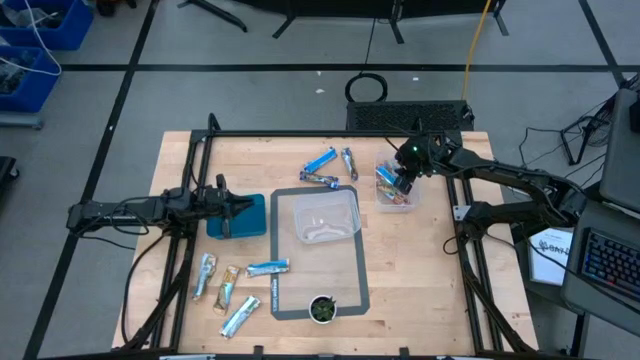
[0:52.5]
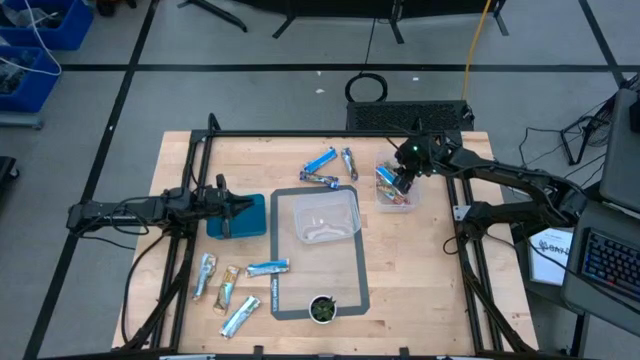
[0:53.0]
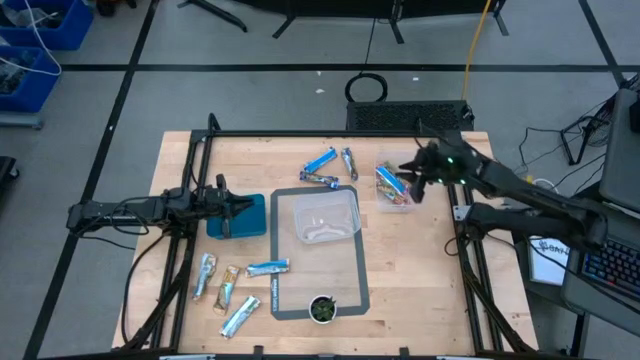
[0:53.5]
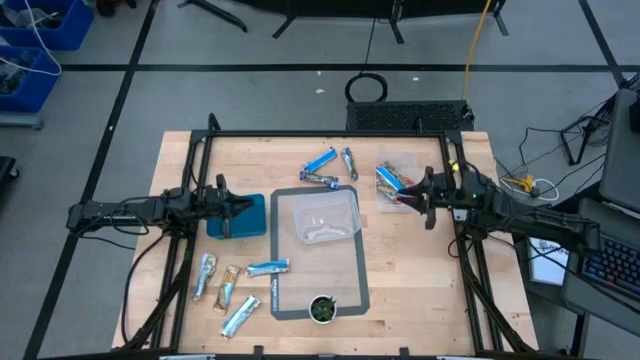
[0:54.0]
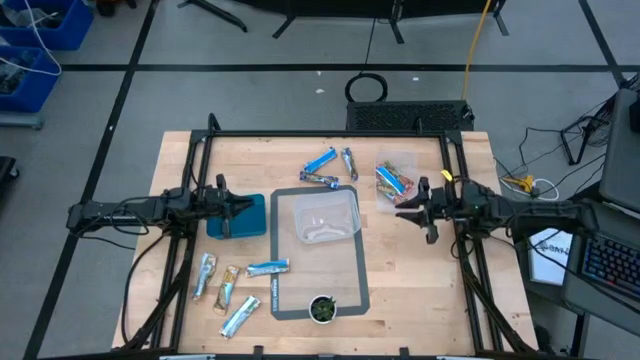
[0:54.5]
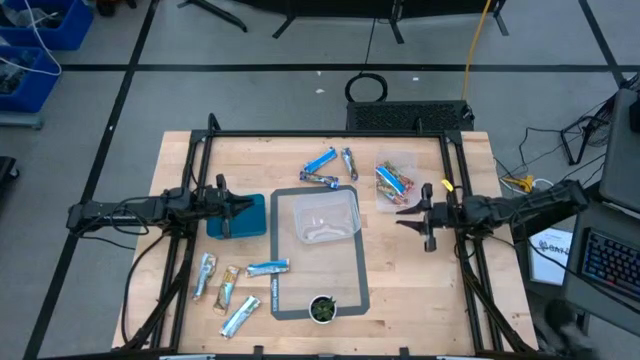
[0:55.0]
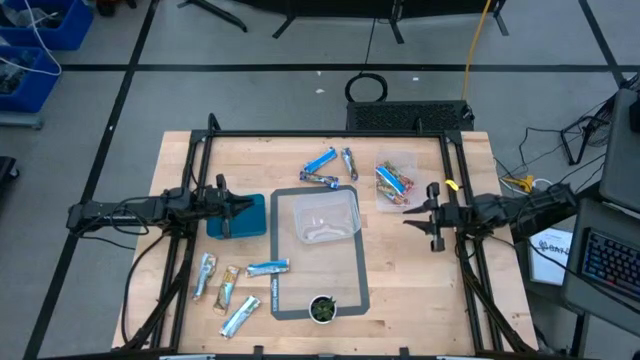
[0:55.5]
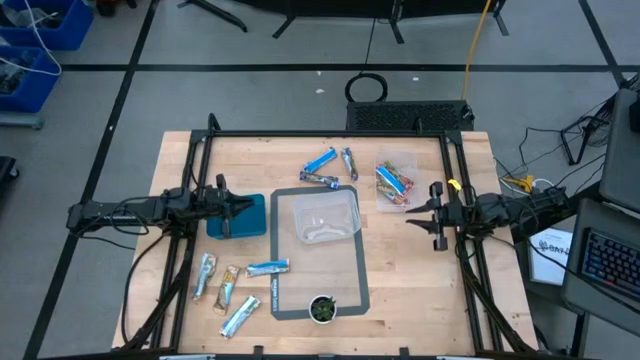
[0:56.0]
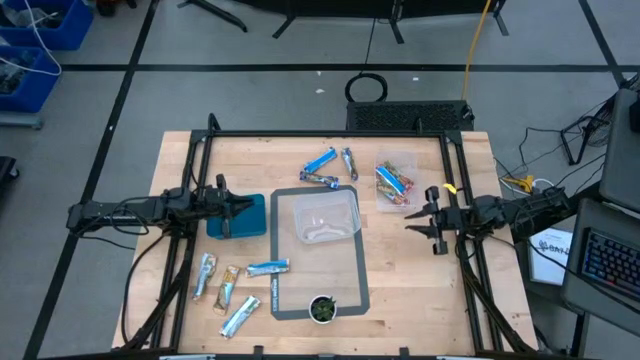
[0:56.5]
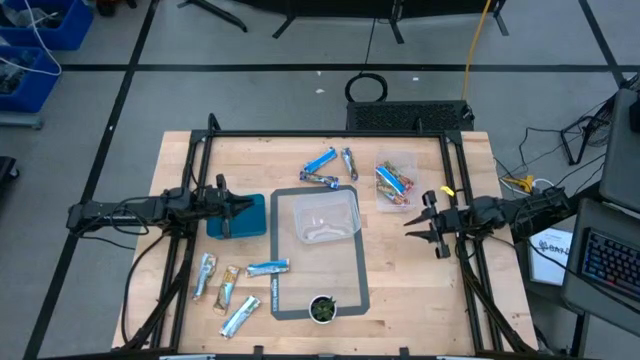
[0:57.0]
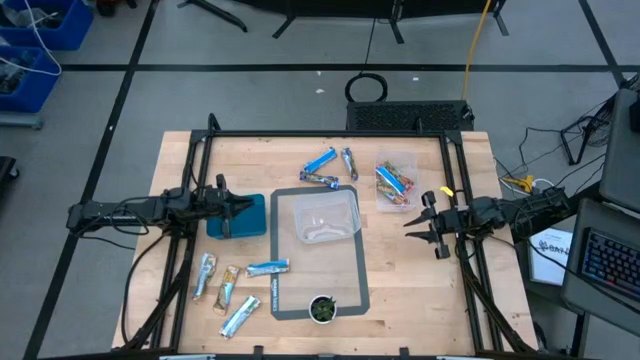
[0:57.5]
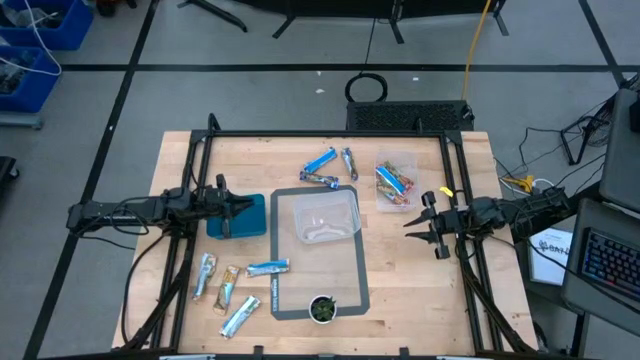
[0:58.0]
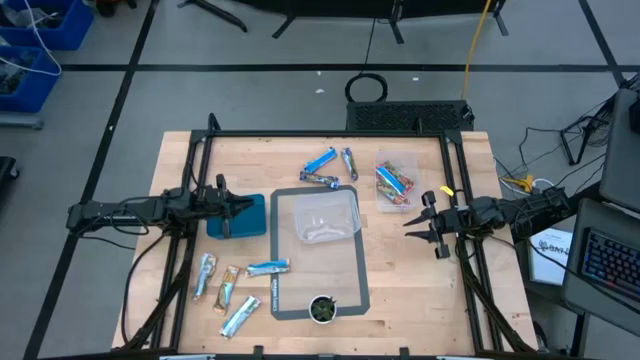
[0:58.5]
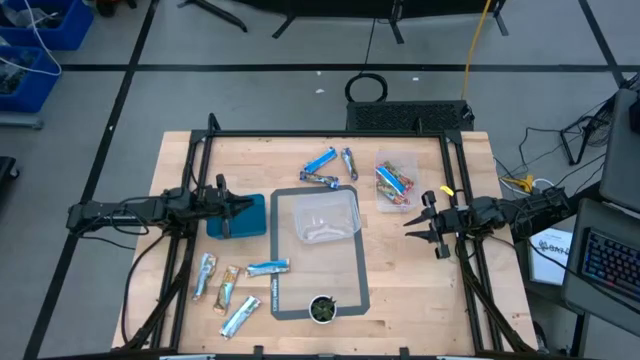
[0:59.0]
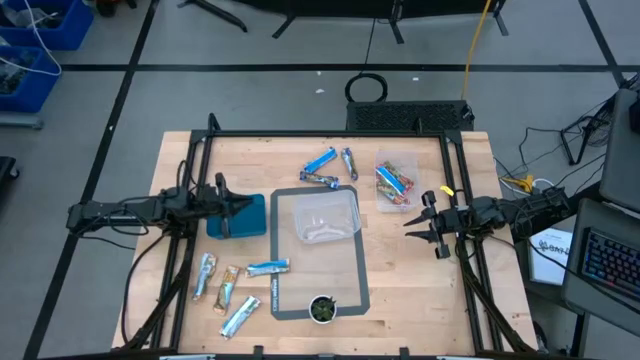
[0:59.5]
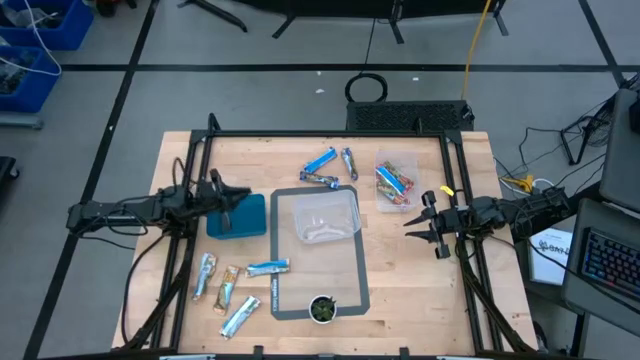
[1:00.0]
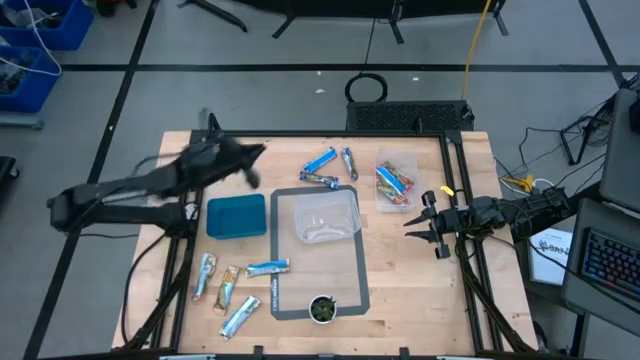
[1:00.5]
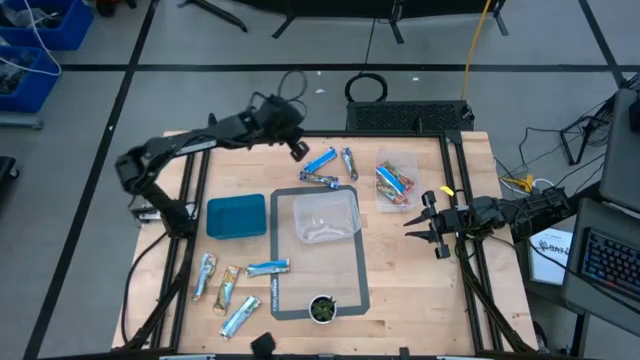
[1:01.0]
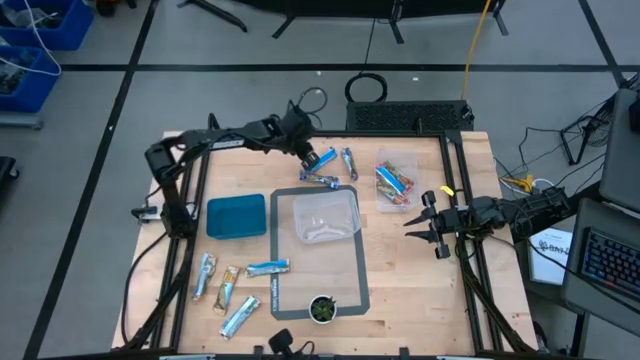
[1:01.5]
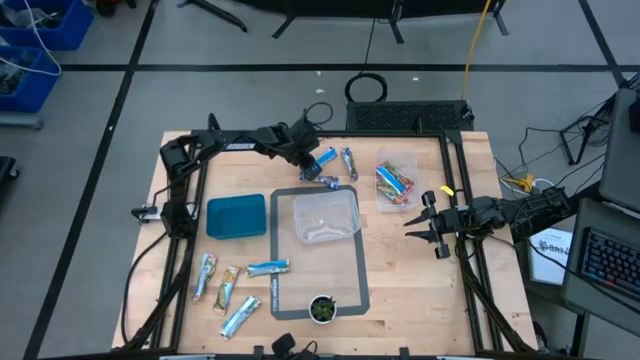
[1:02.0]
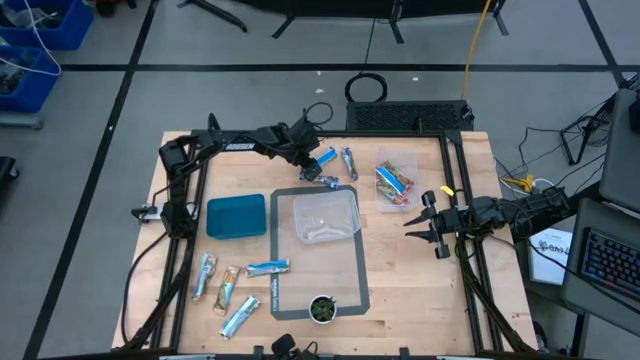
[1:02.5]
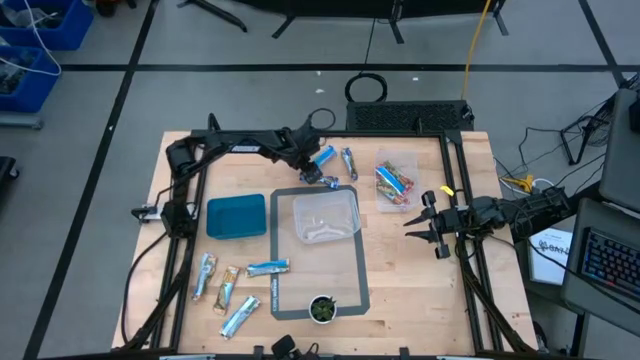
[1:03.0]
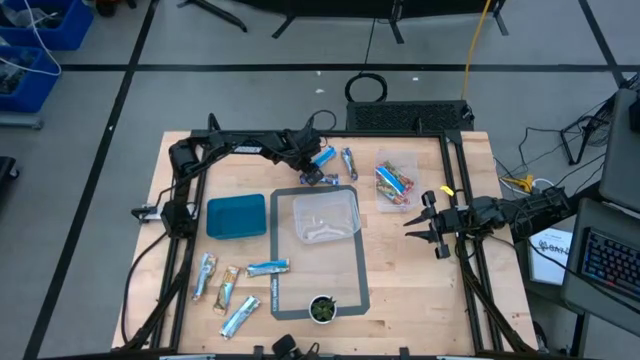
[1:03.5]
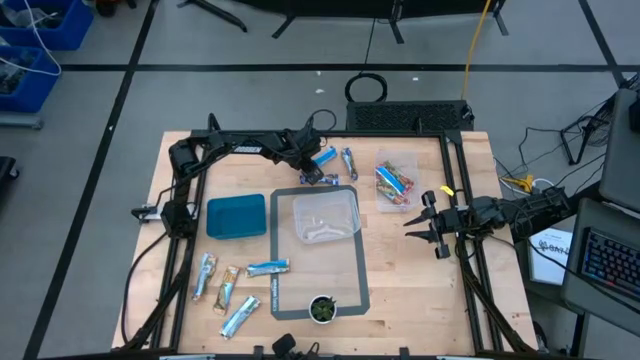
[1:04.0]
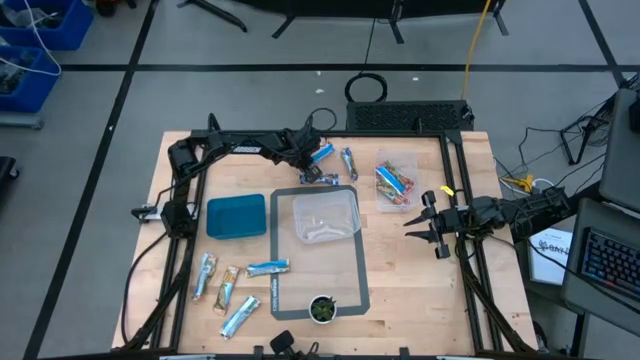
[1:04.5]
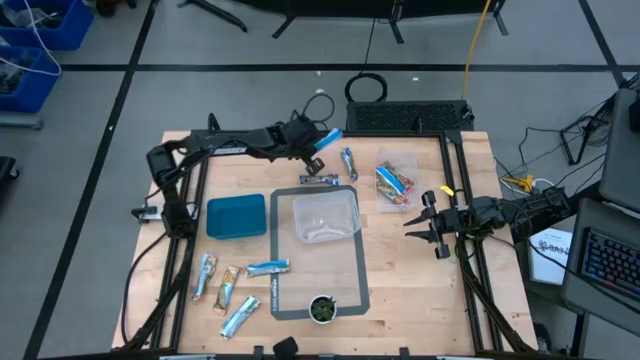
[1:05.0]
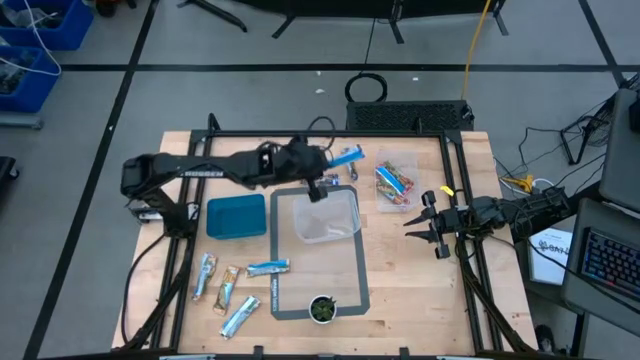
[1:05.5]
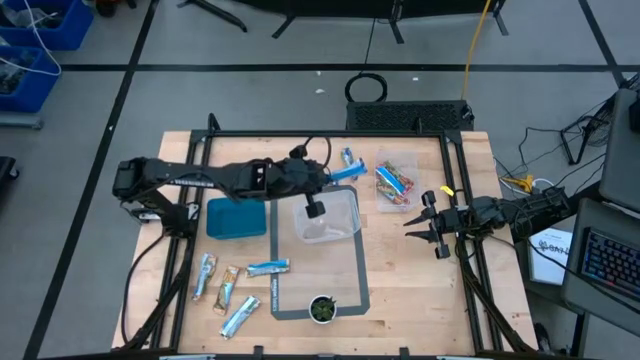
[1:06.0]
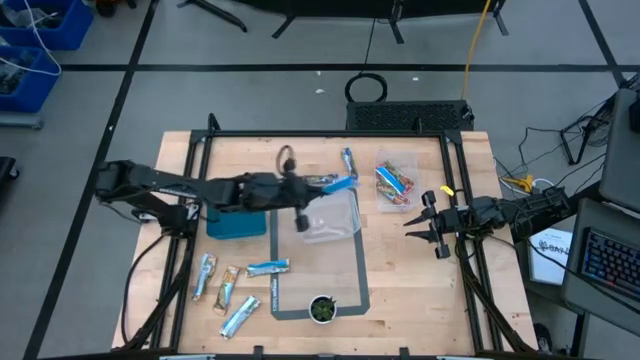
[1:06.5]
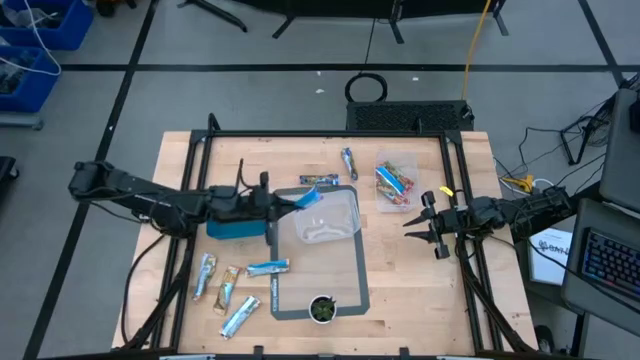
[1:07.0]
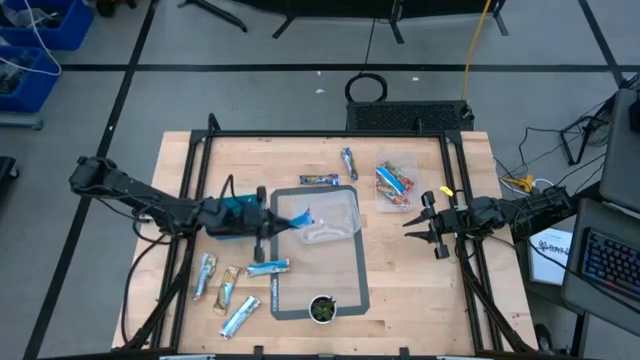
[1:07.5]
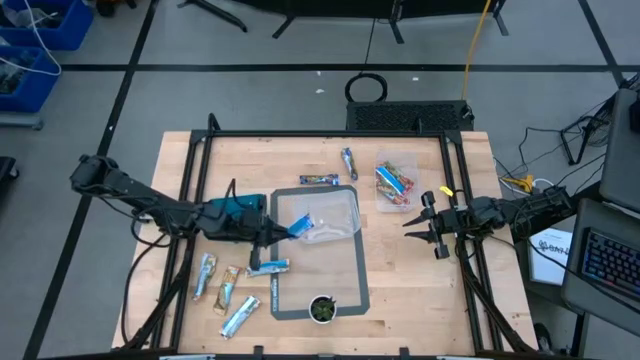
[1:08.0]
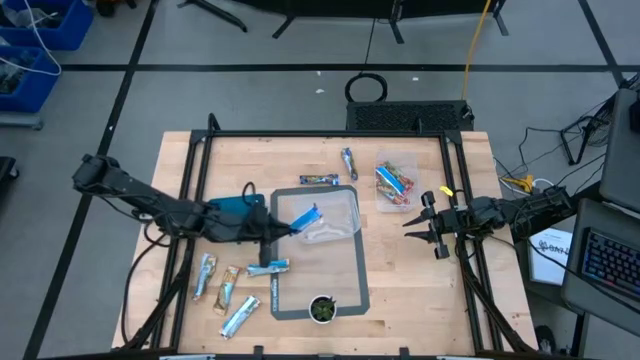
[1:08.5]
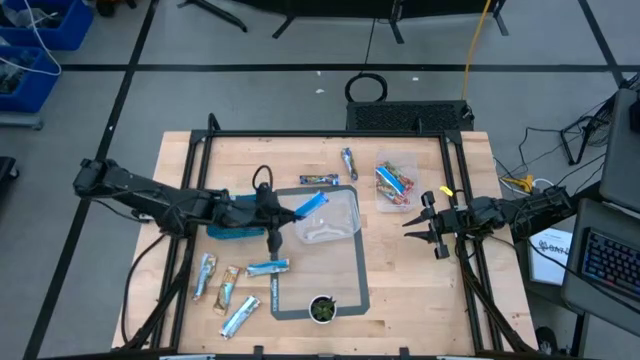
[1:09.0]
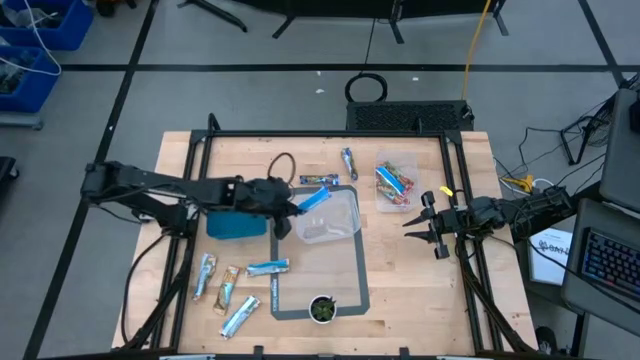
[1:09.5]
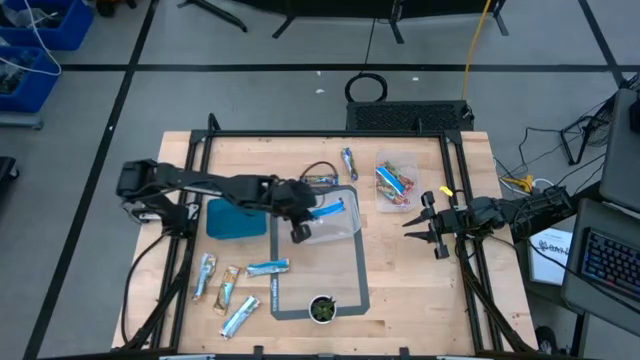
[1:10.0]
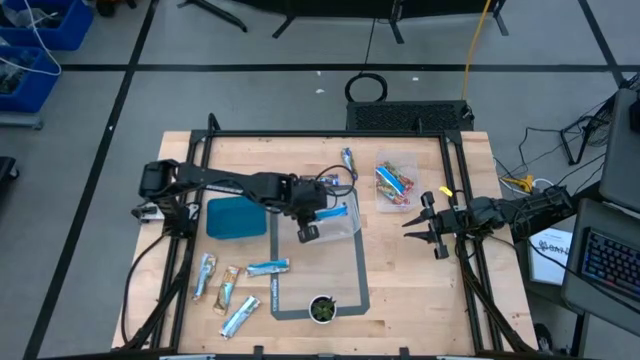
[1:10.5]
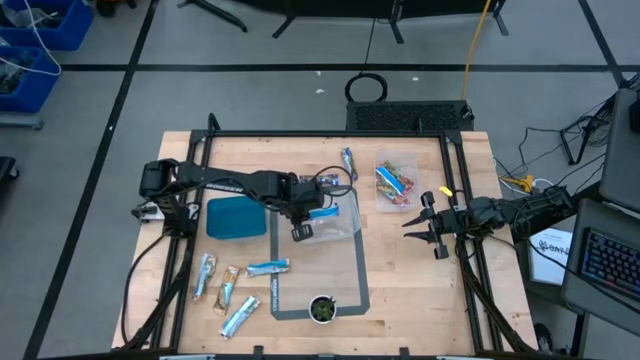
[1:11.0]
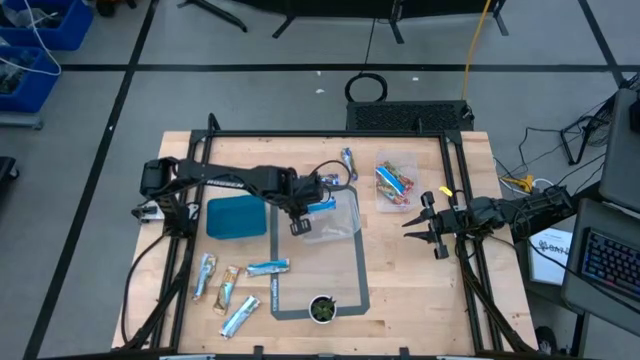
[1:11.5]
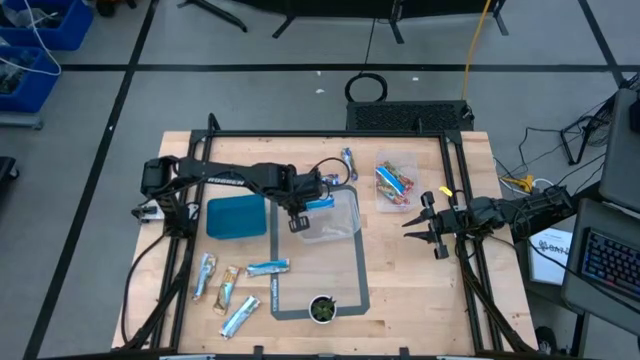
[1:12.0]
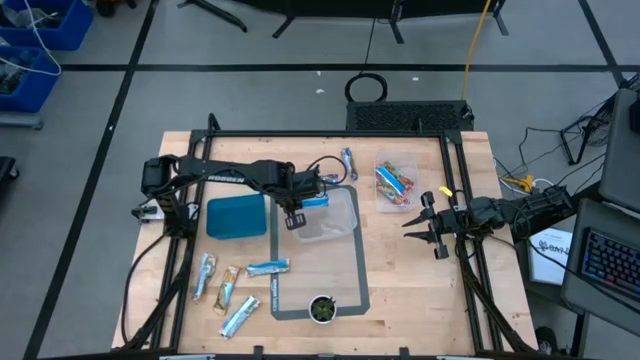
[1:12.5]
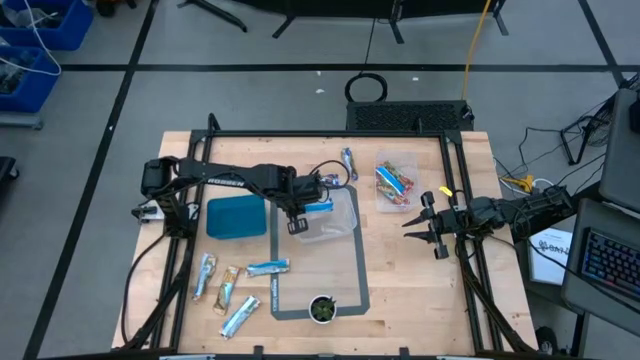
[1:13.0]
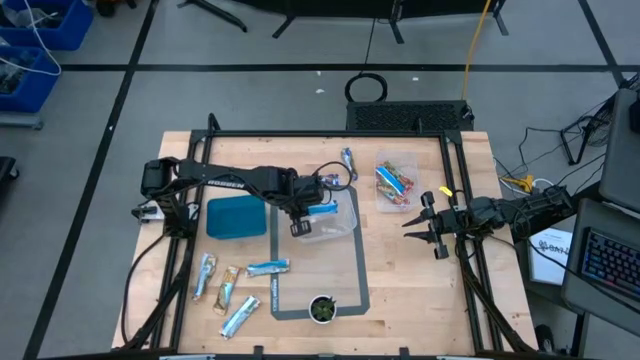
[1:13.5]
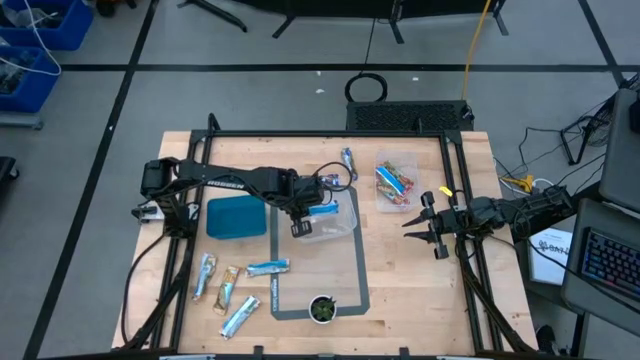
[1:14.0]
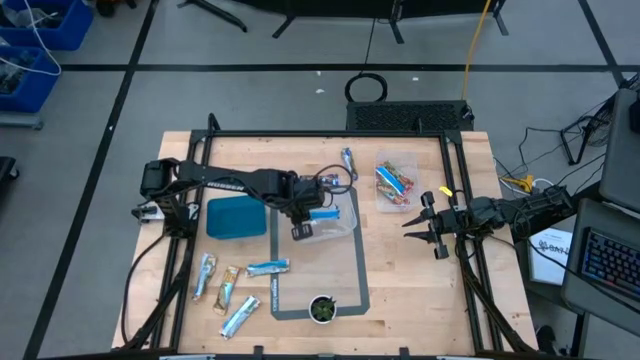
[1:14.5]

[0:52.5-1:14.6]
Task: Pick and place Granola Bars by type
Put the blue granola bar into the left transparent bin
